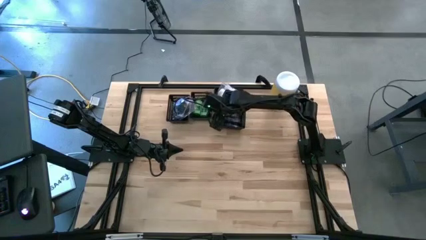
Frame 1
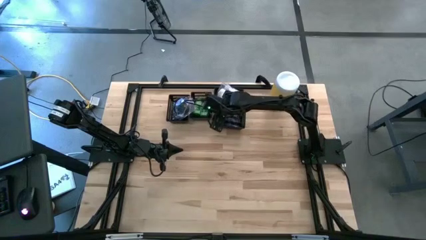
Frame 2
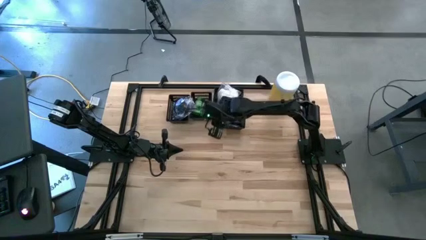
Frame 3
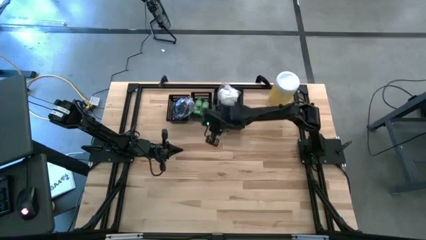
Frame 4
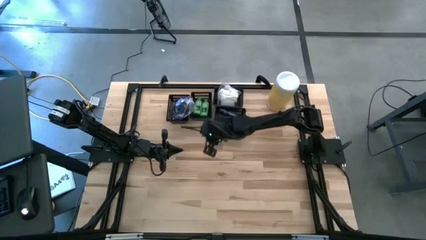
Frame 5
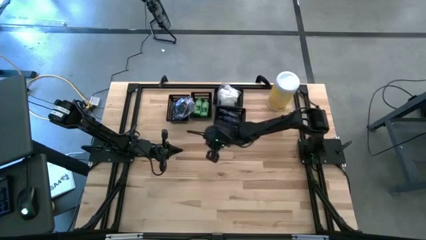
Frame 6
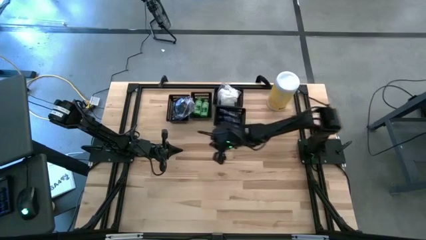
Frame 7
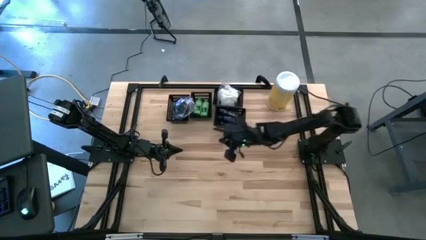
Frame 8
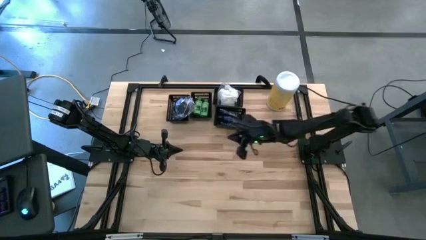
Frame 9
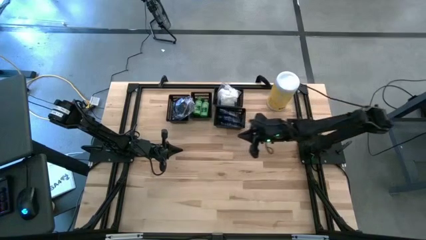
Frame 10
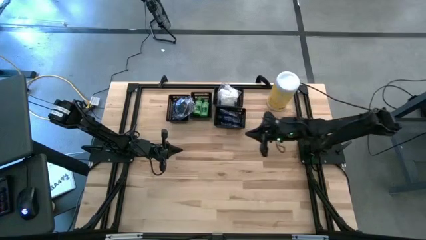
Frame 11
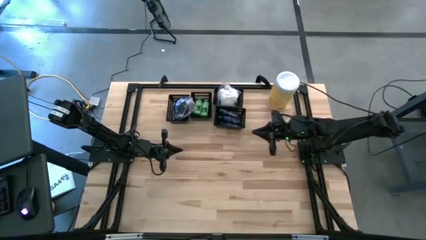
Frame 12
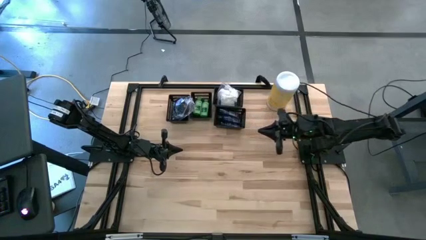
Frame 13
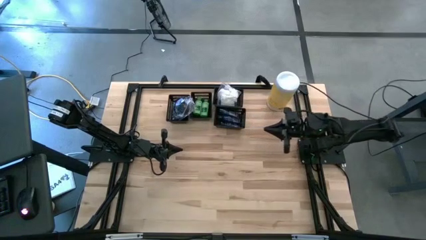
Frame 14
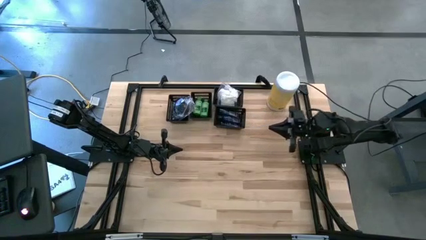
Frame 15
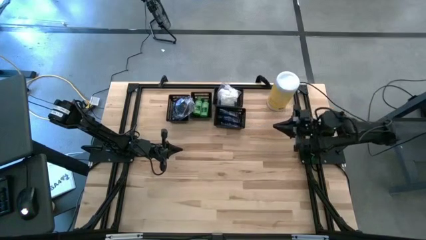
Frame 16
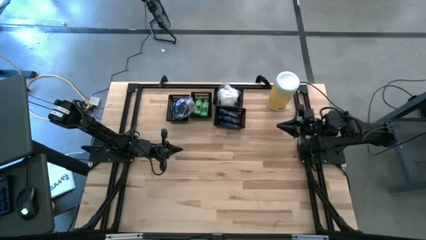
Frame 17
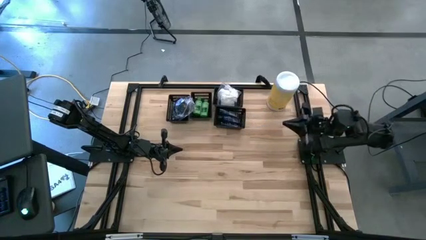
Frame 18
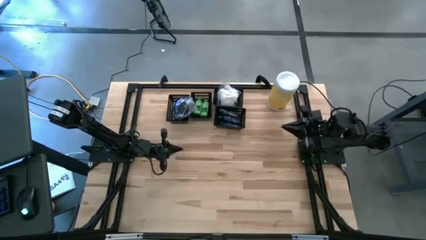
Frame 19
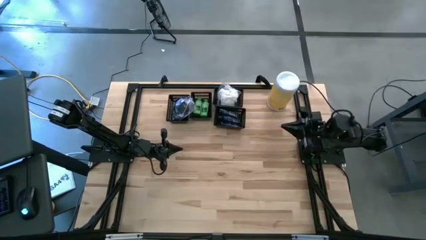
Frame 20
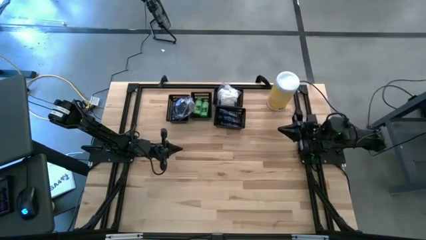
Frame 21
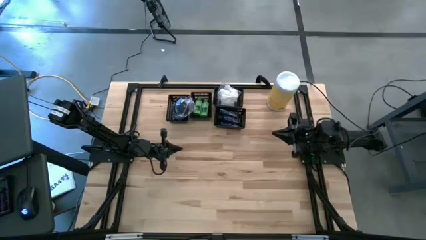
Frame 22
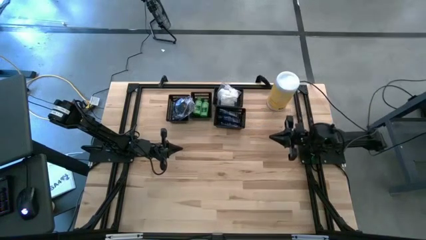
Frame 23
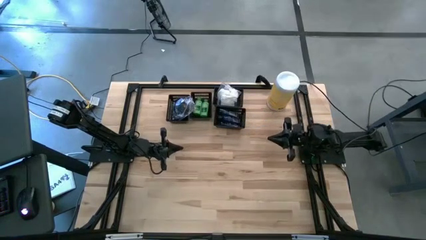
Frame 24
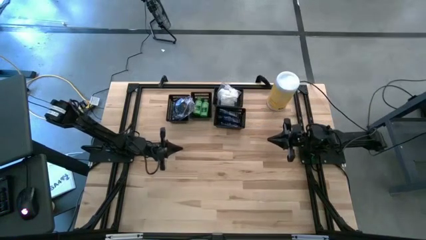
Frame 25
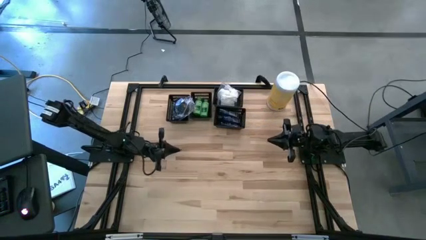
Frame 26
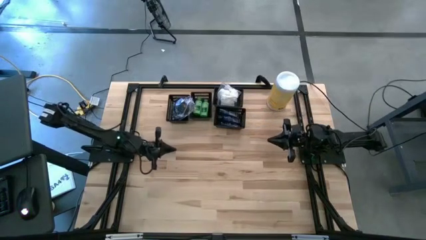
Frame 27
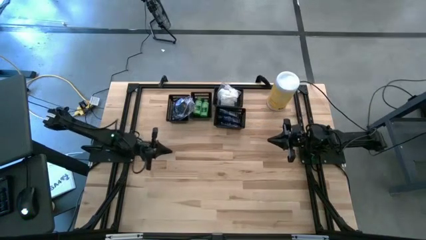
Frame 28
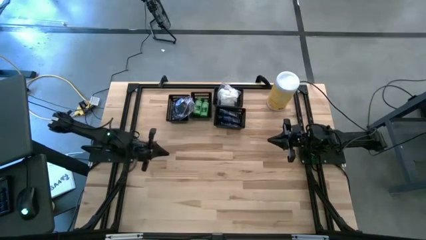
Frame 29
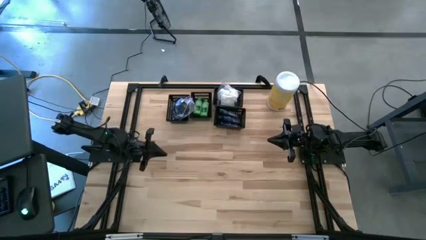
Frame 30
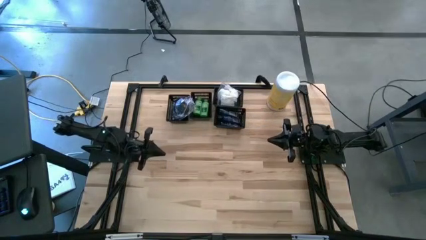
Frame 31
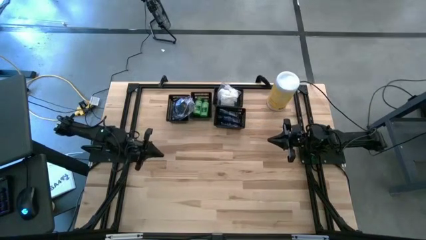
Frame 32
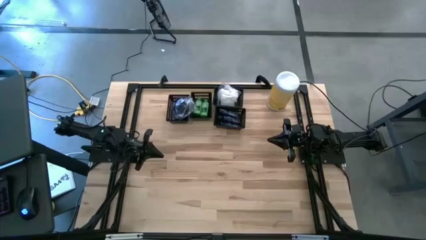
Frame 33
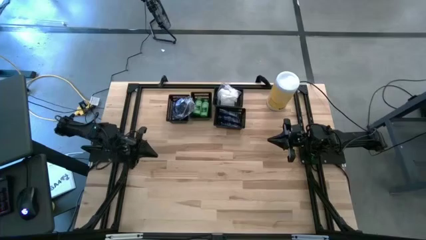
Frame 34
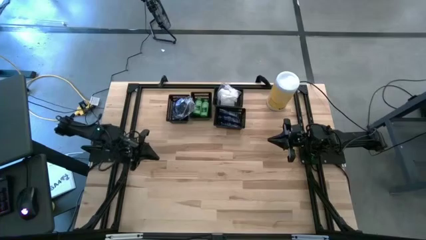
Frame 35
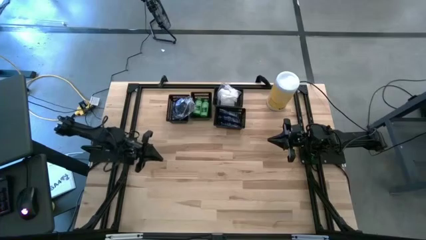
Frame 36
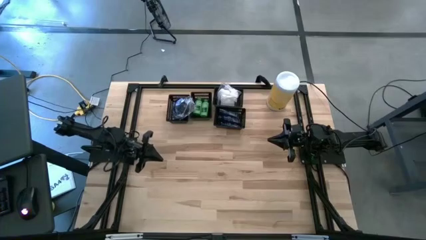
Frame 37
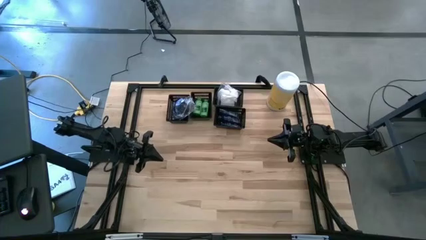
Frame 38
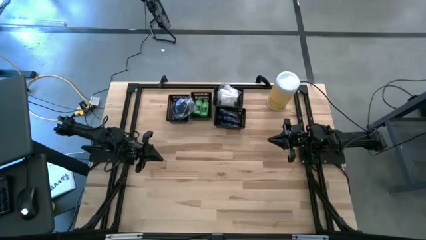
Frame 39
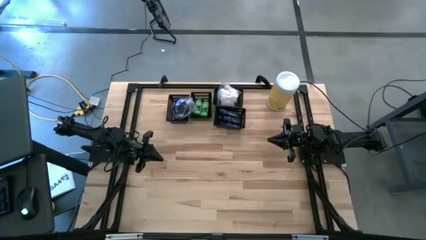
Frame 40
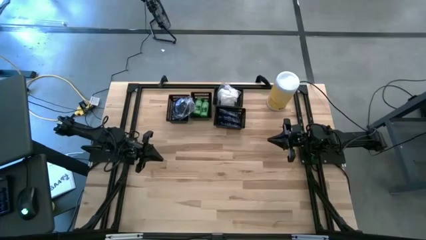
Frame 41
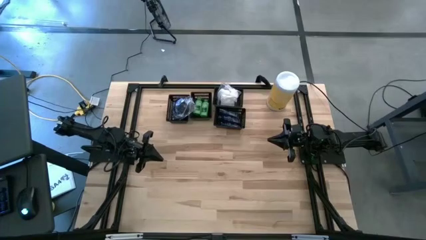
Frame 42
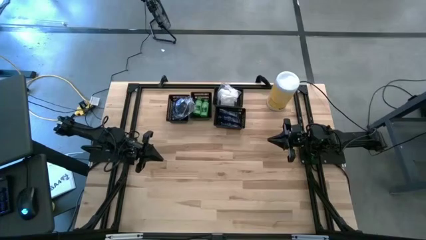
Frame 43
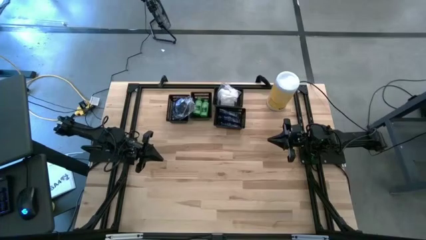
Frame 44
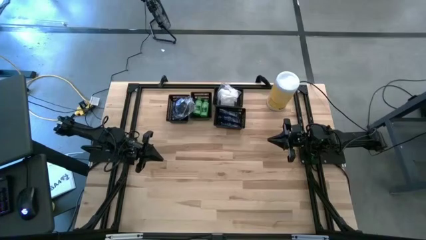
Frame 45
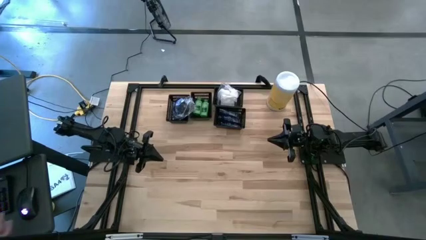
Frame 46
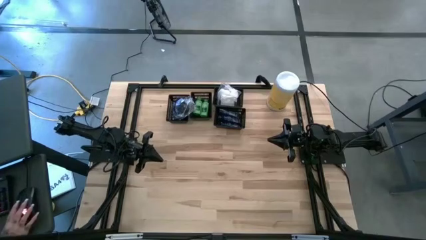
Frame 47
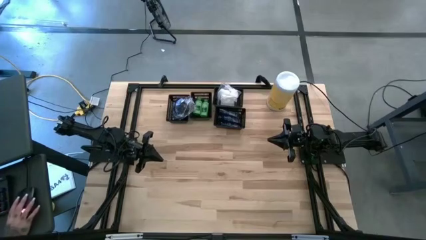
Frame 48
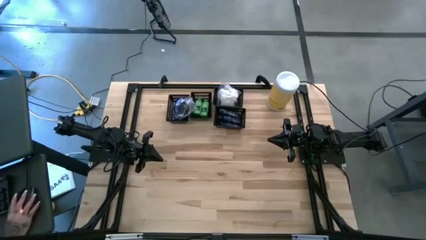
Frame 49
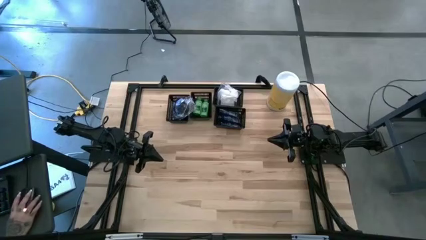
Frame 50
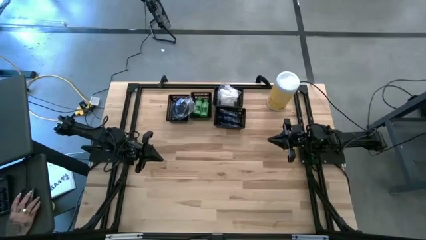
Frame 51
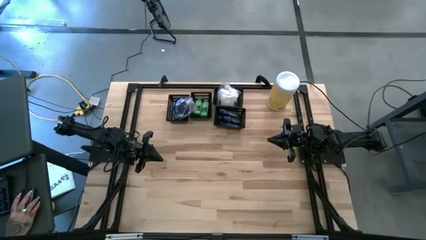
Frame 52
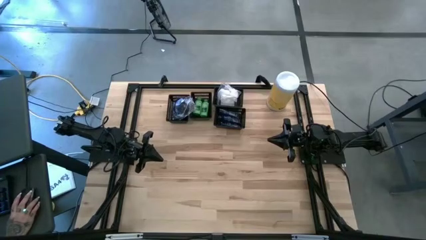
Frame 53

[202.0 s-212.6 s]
Task: Pick & Place Travel size toiletries
Return to Home Position

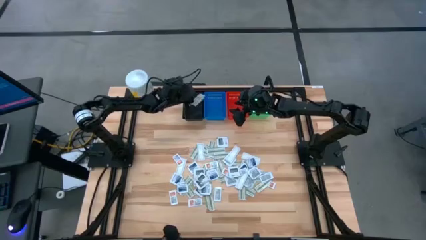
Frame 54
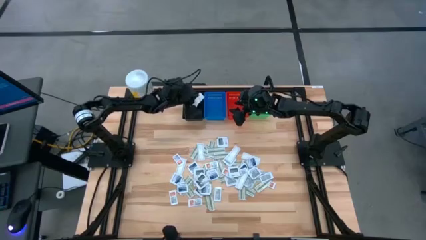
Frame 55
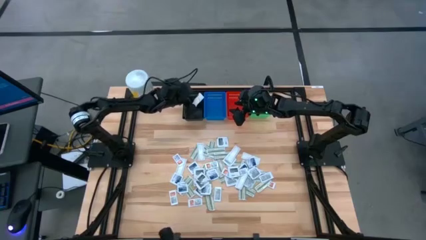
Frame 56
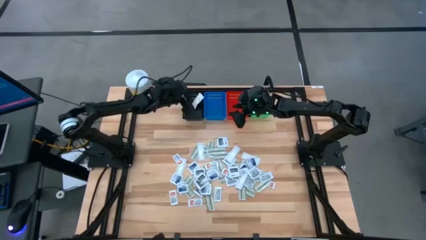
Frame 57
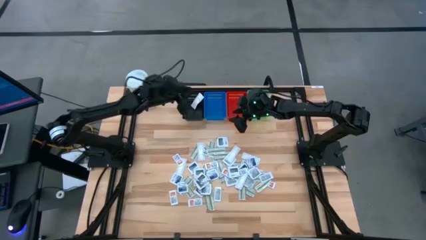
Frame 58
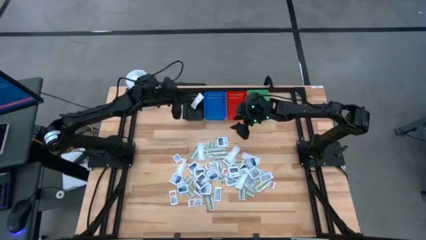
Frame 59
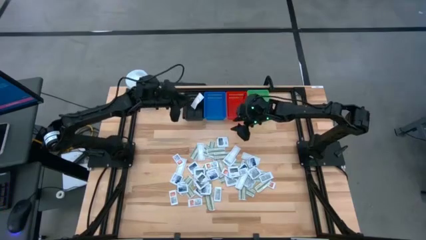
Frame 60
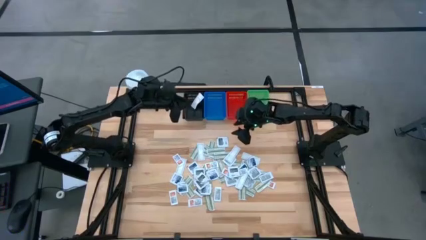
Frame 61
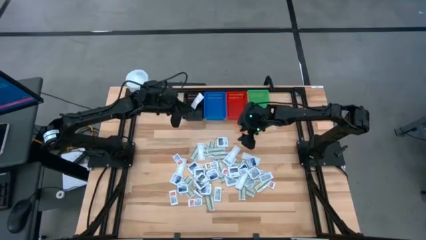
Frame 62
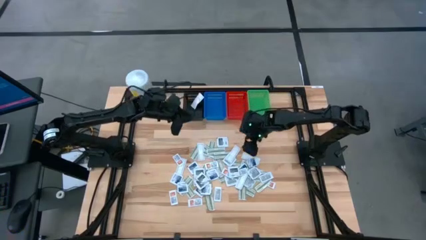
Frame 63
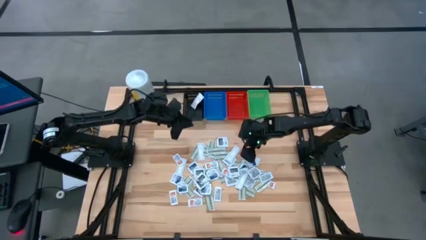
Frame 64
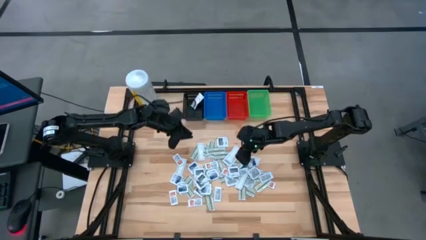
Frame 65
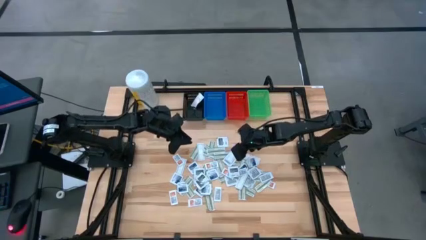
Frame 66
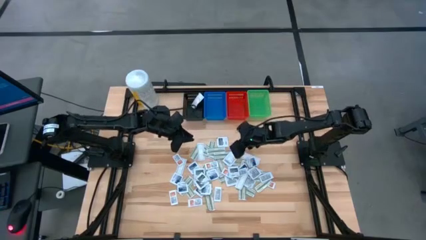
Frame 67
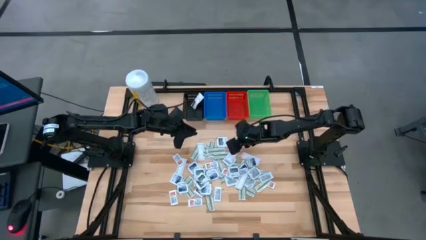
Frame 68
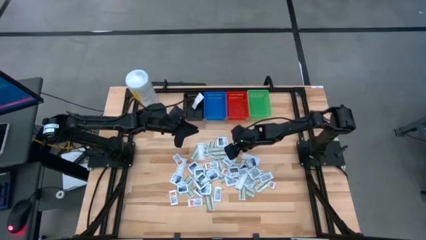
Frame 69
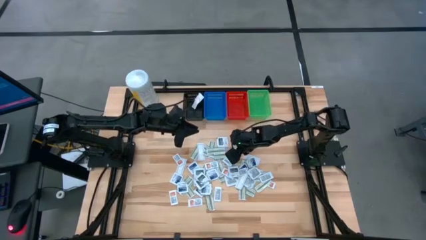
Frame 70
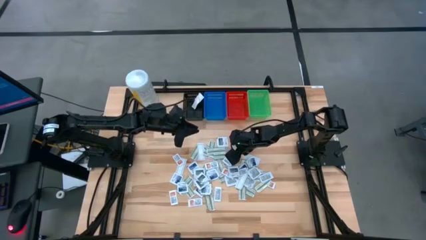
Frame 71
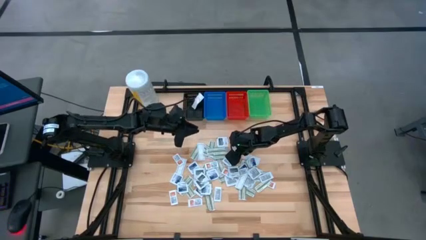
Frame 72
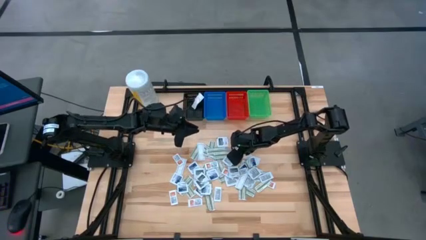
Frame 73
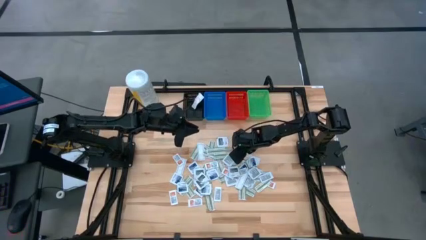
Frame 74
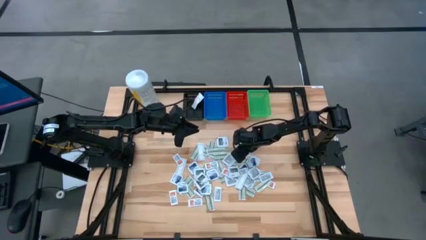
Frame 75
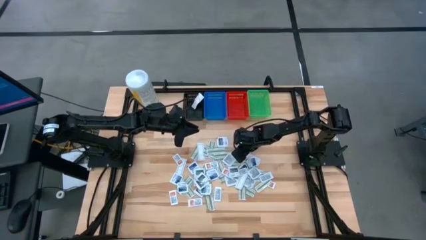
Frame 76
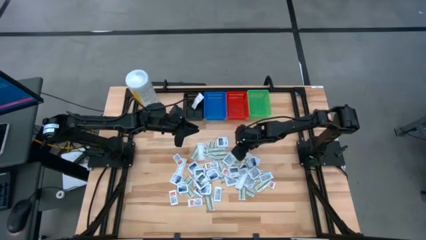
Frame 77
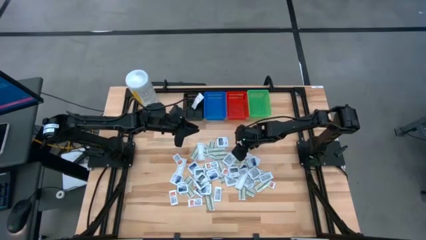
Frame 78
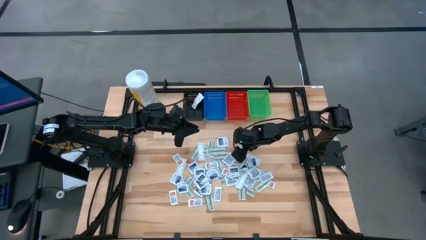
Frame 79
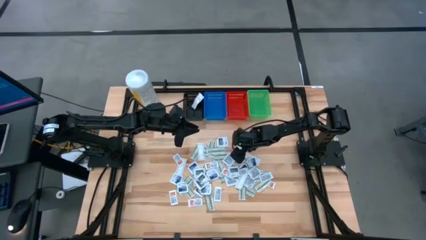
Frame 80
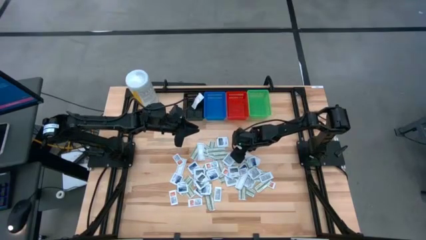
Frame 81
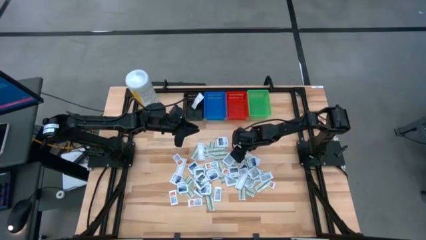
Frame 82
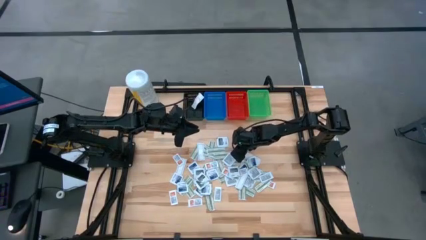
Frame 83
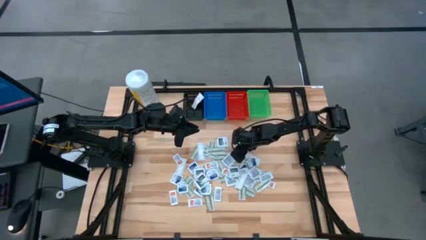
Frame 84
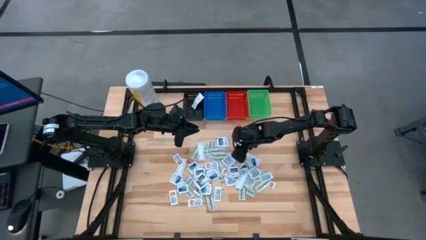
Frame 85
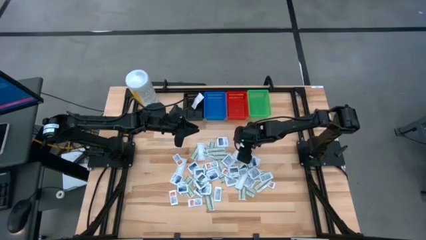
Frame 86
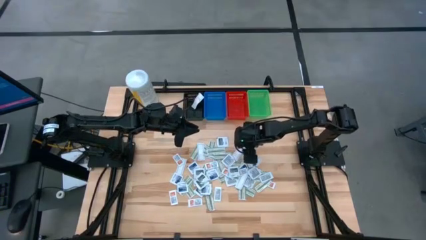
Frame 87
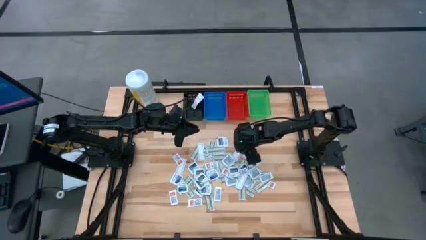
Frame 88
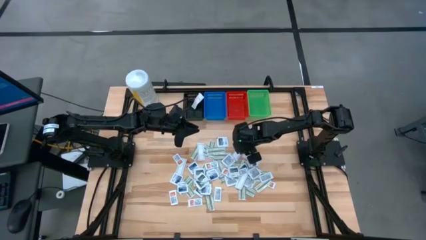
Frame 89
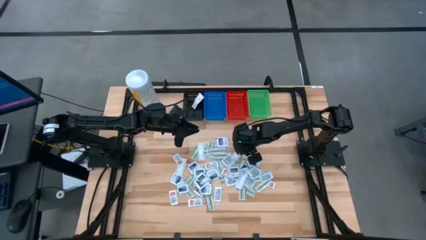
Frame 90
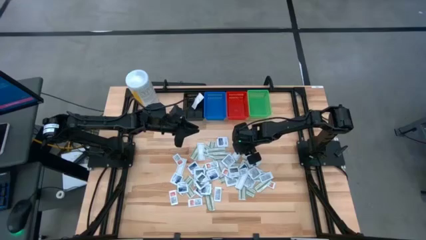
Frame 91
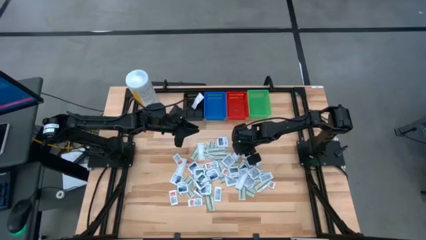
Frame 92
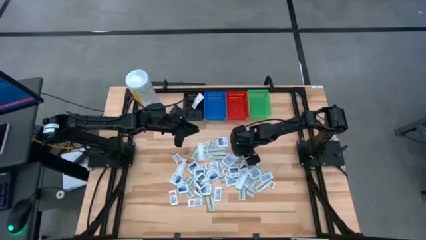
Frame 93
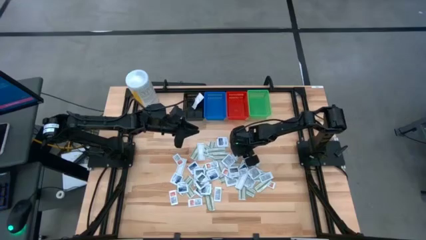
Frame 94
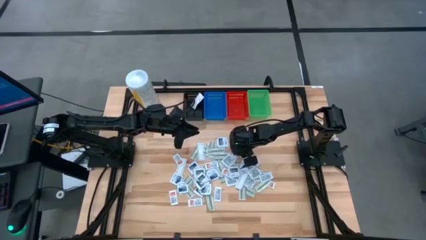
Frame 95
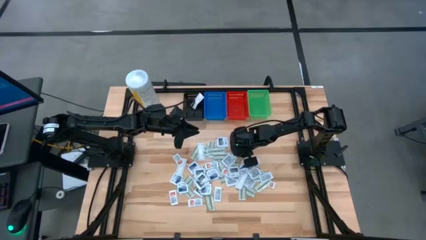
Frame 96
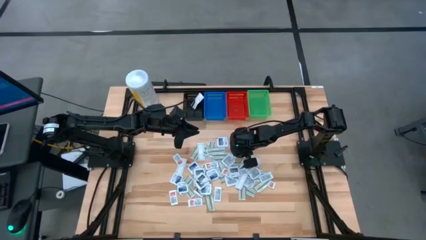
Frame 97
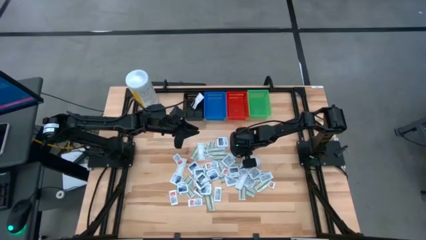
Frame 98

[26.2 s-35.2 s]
Task: Pick & Place First Aid Supplies
Put the green bandage pack in the black bin
